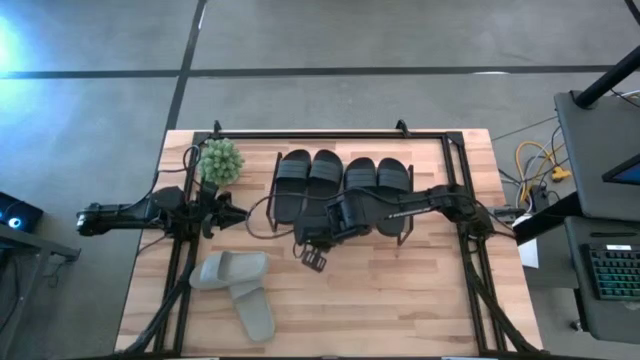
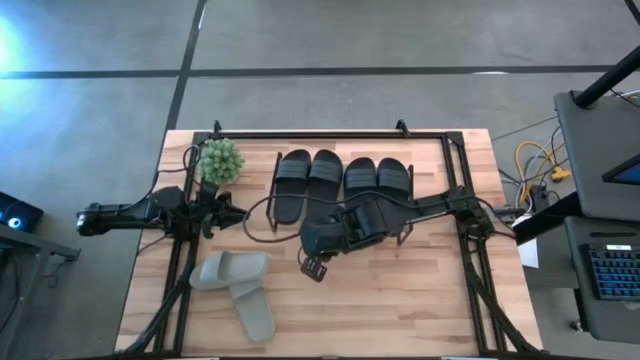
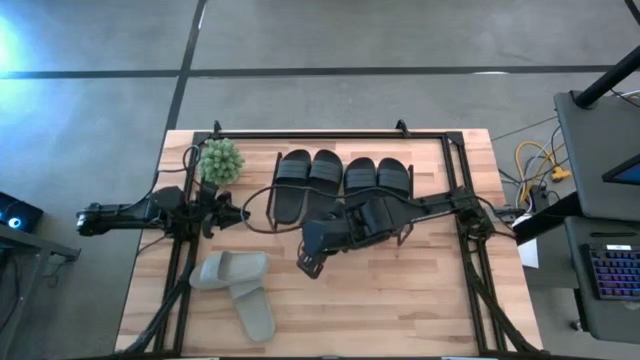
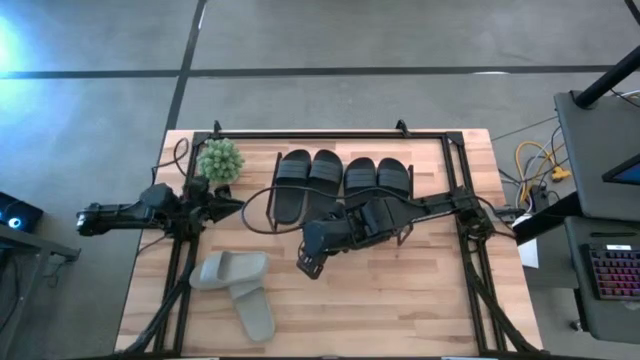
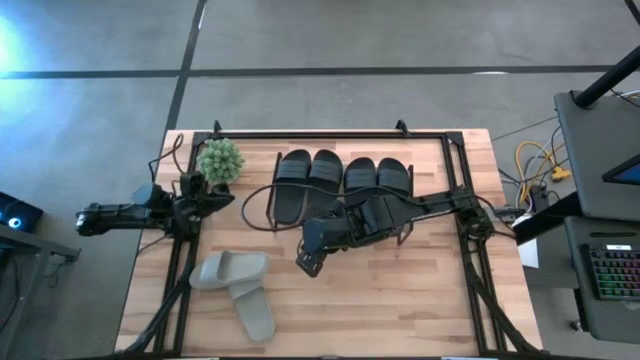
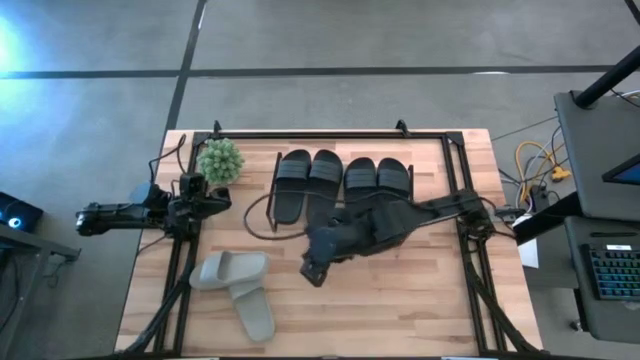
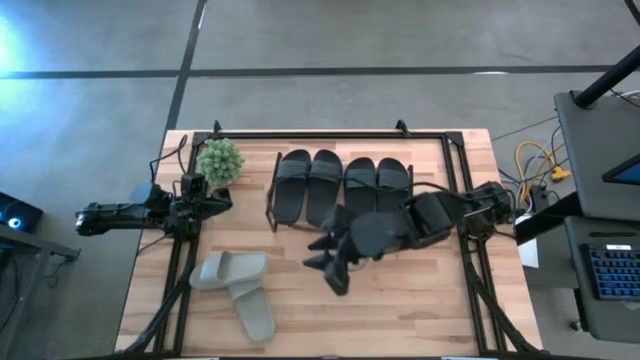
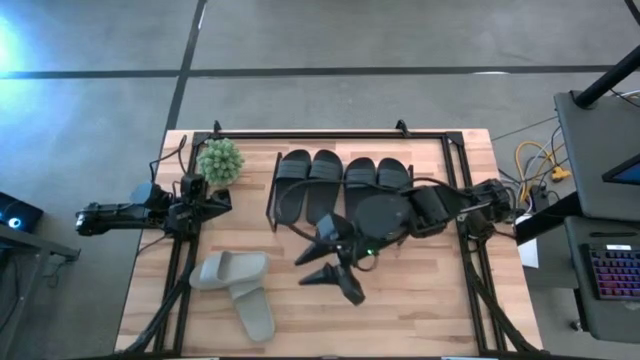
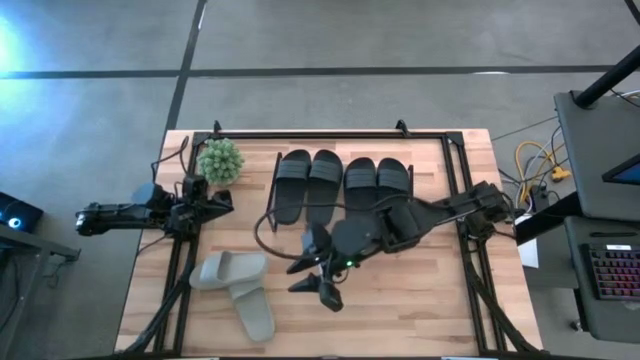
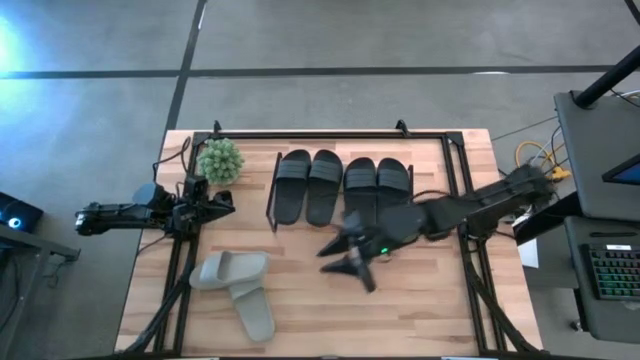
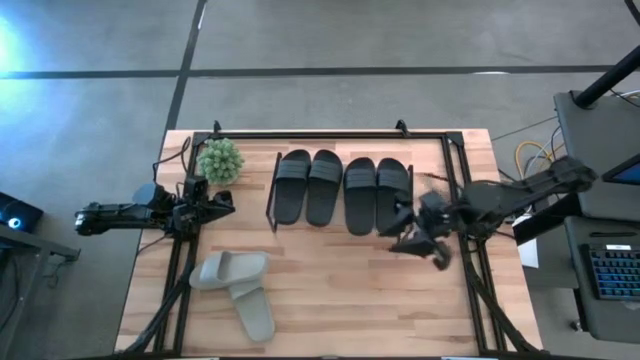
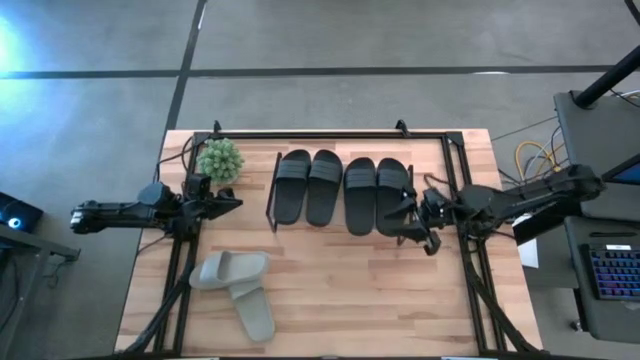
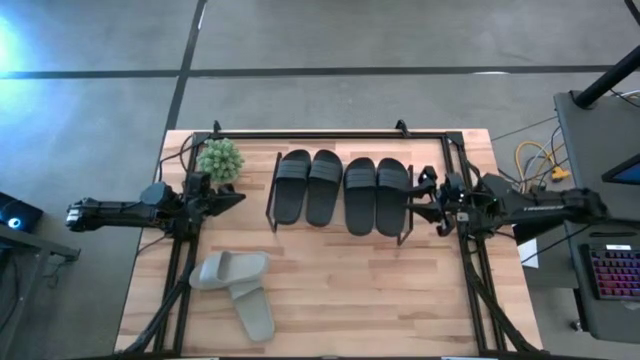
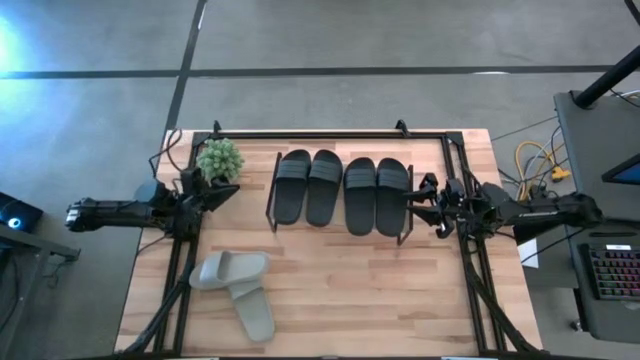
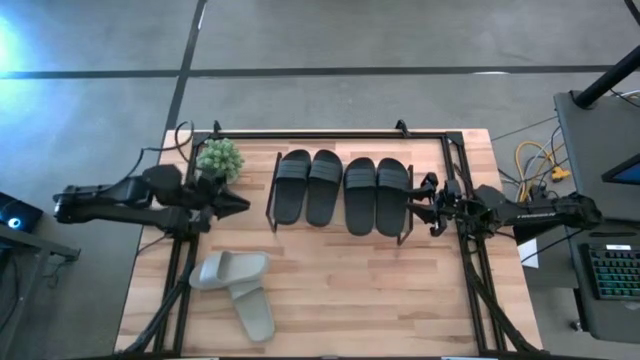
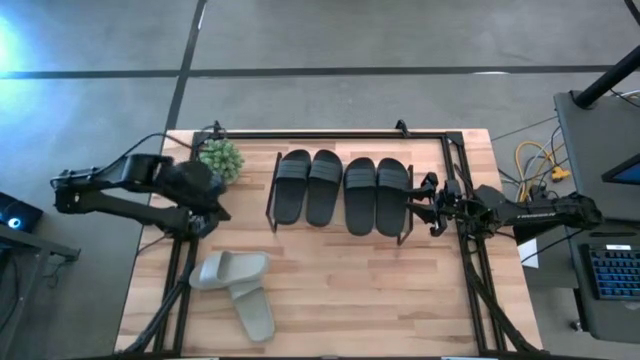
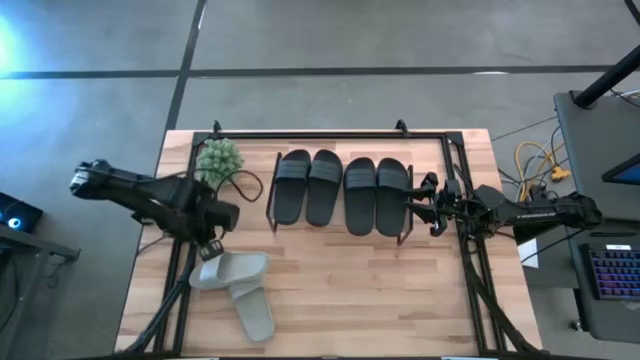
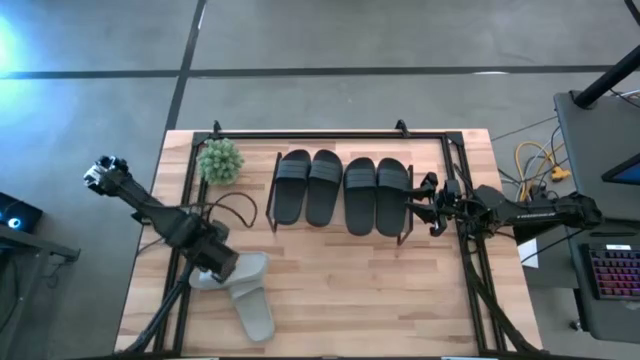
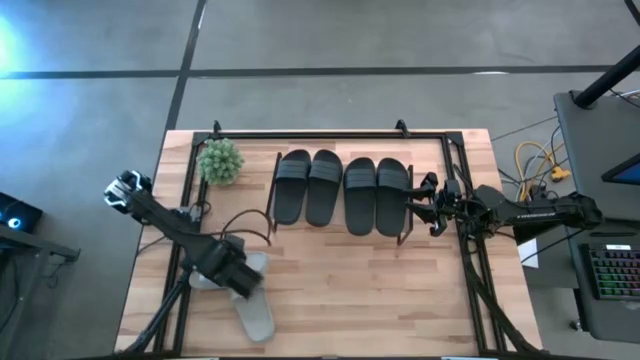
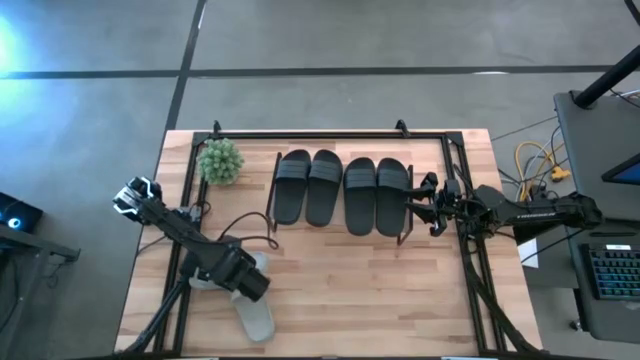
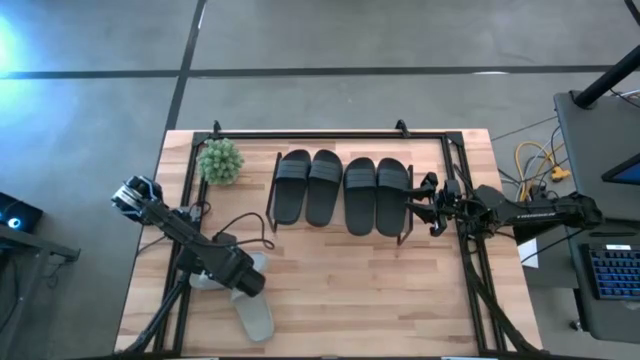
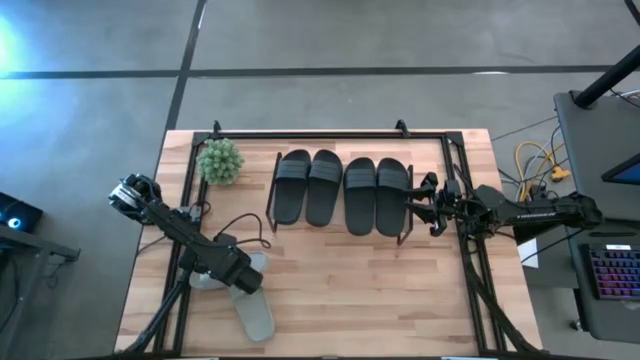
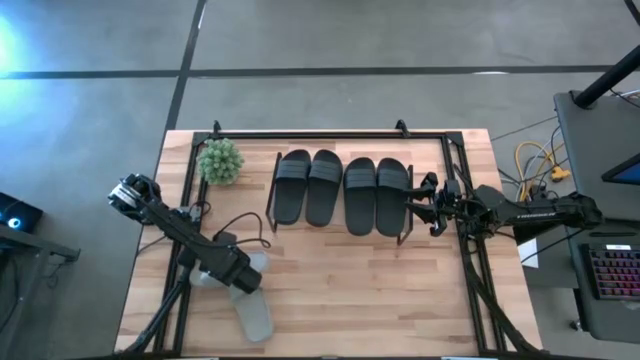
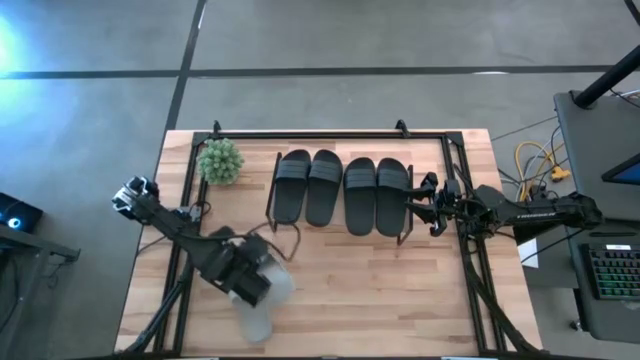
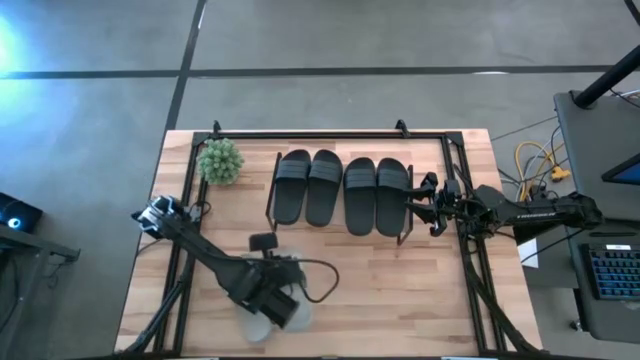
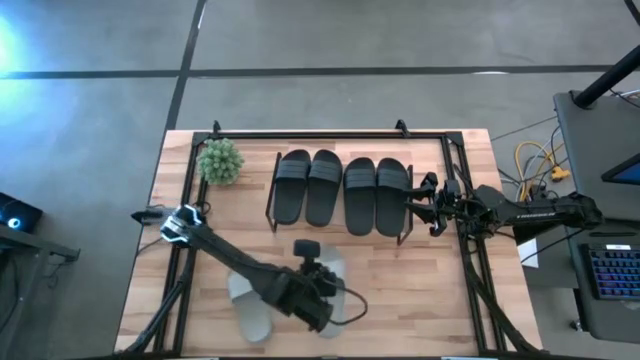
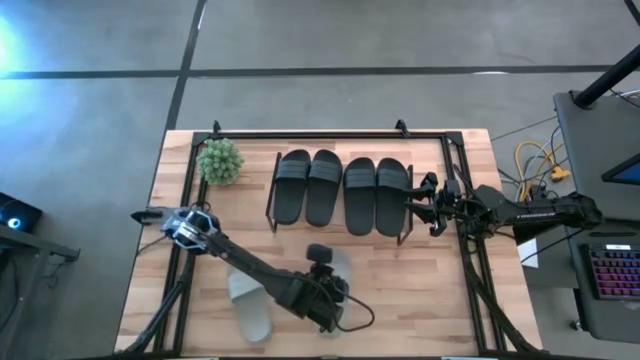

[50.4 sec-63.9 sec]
Task: Pick and place slides into the shelf
Put the gray slipper under the shelf

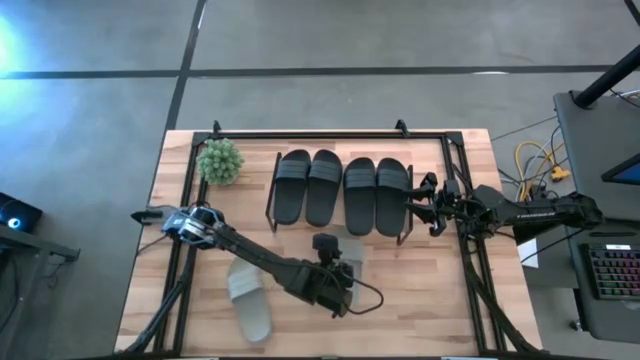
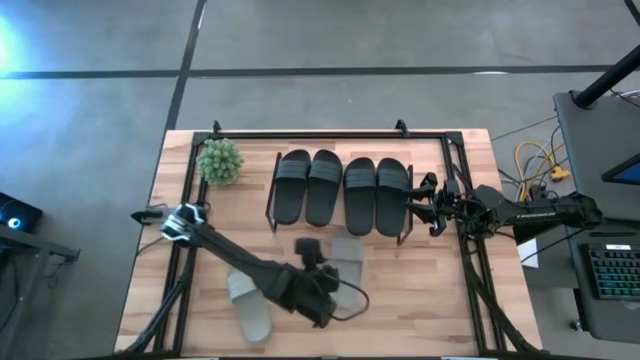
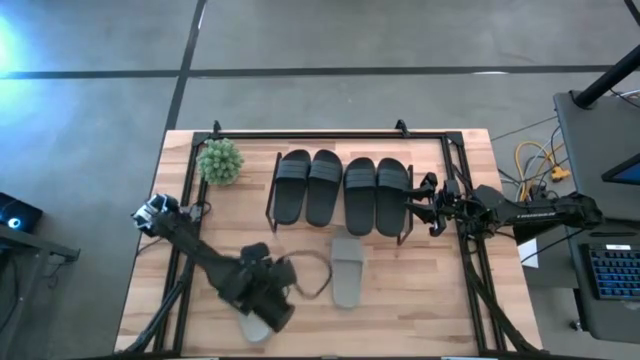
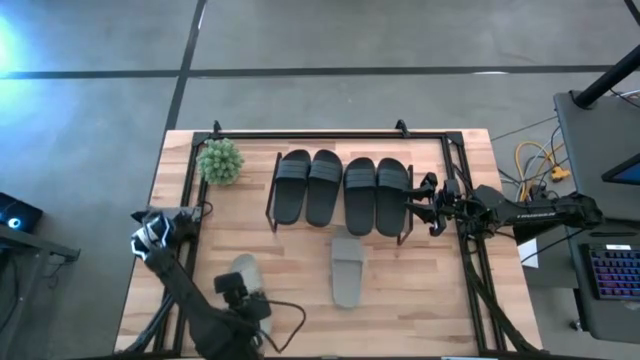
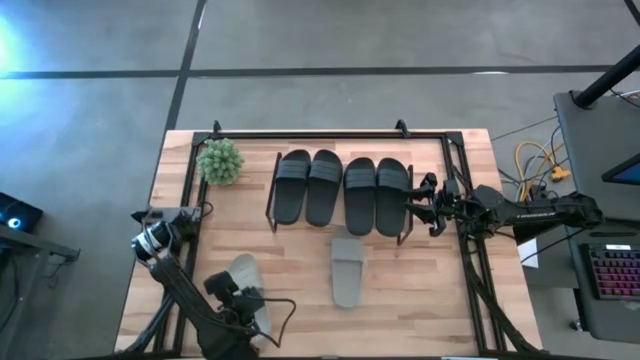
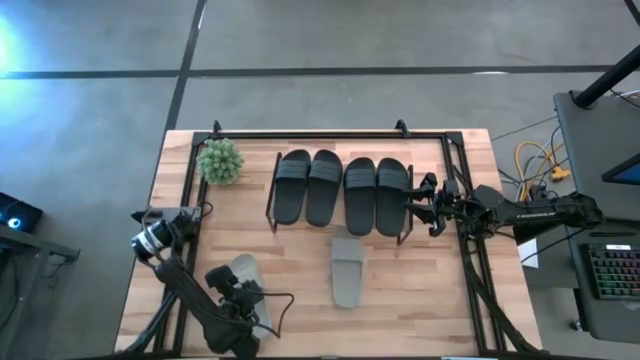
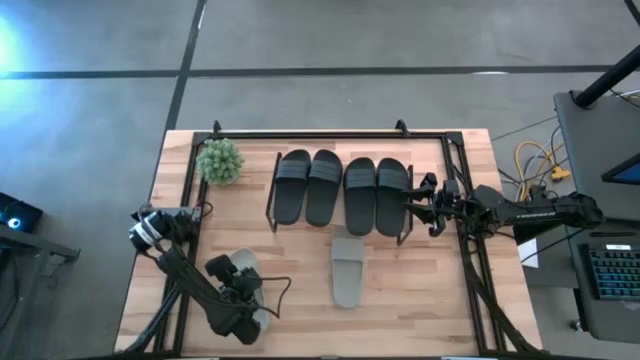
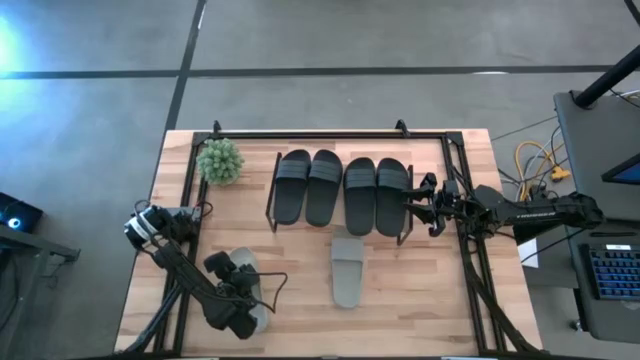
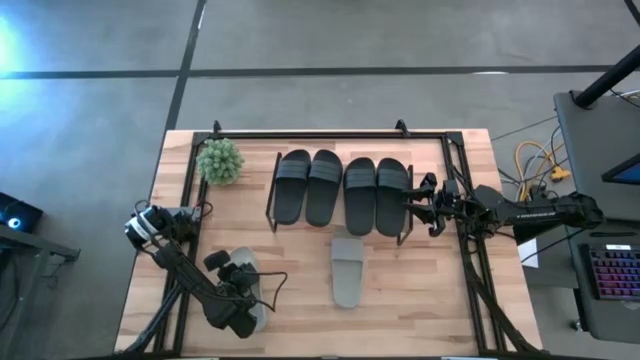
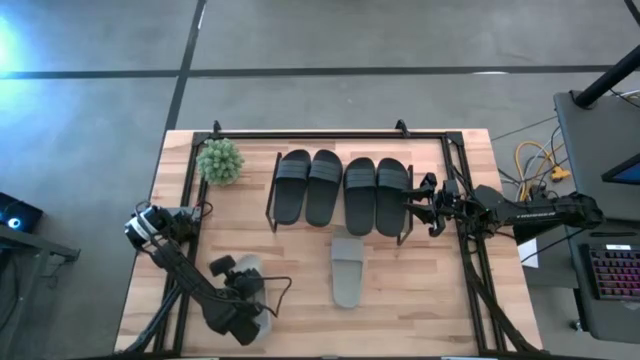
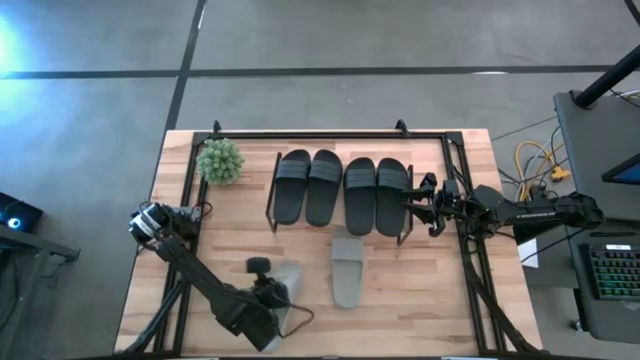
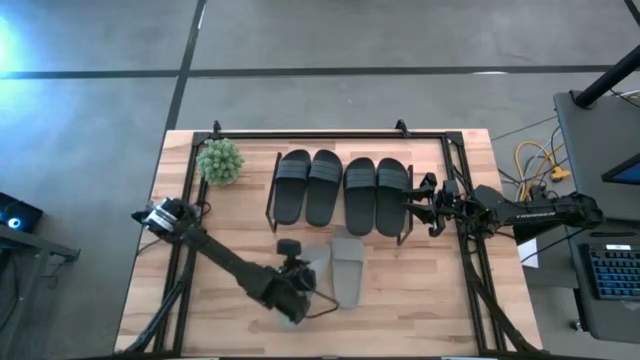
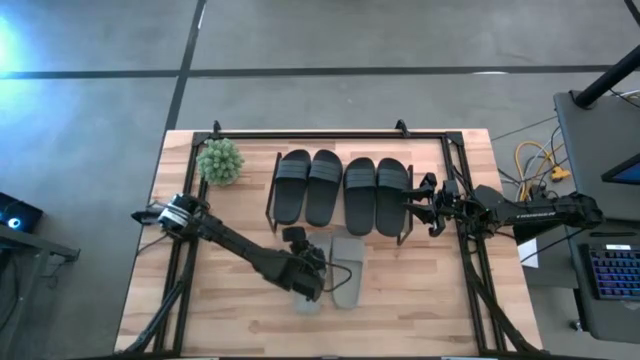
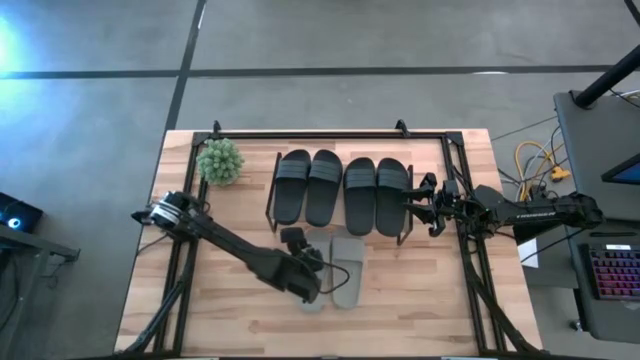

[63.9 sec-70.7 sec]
Put the gray slipper under the shelf
